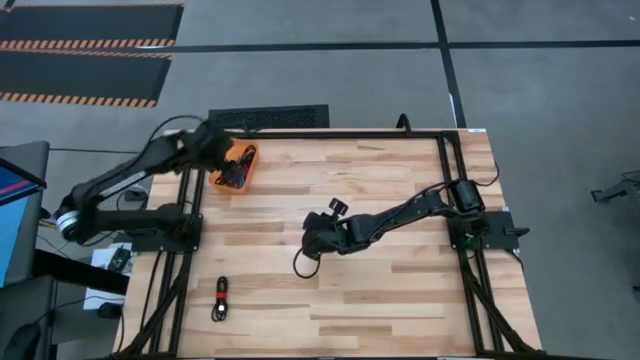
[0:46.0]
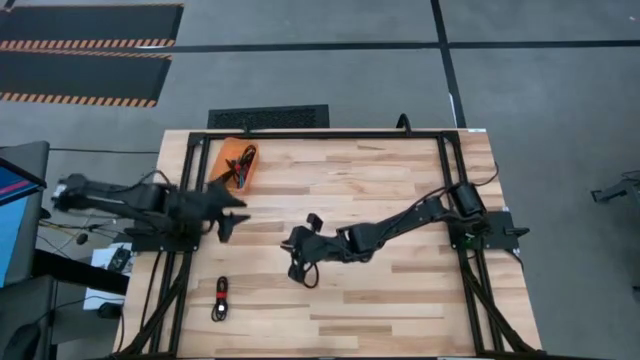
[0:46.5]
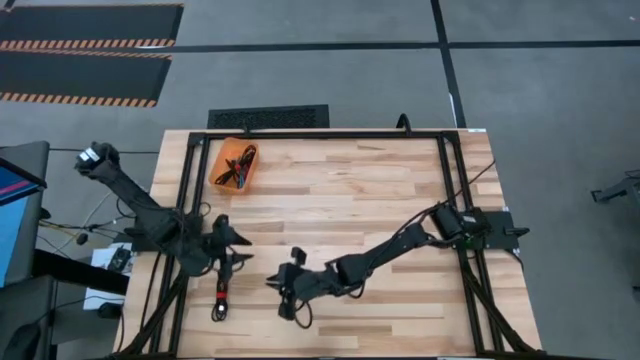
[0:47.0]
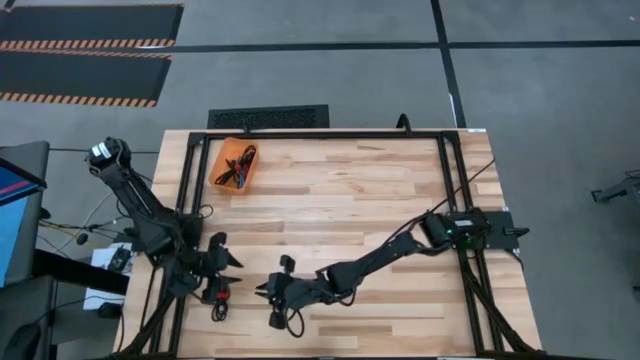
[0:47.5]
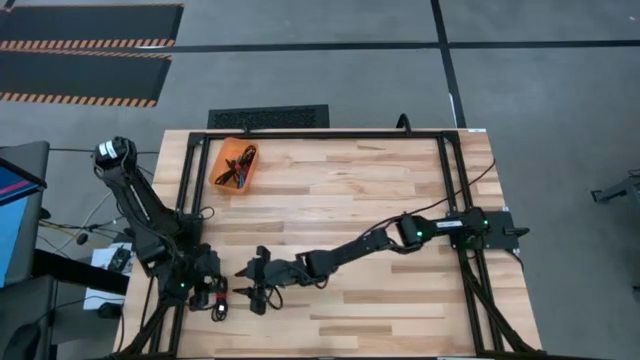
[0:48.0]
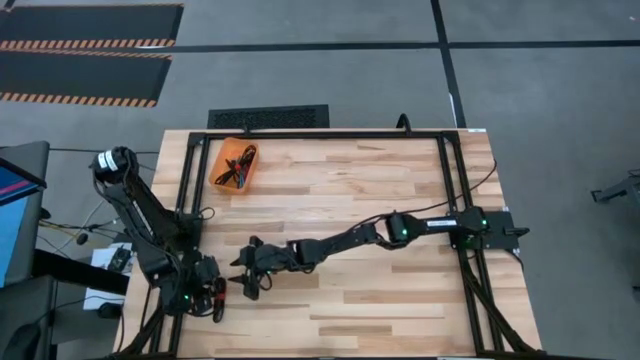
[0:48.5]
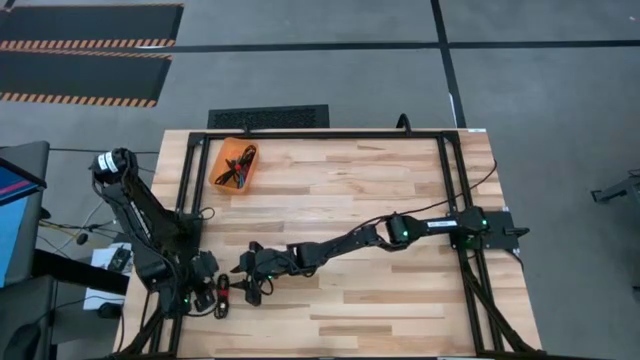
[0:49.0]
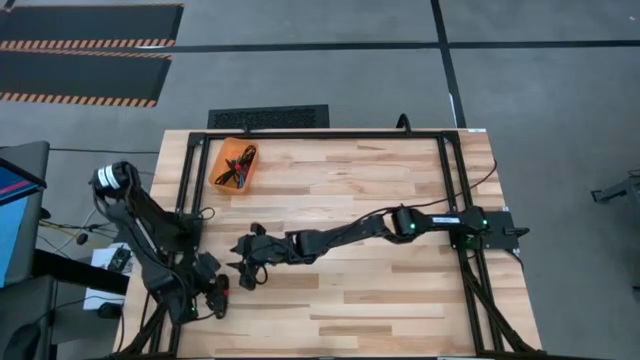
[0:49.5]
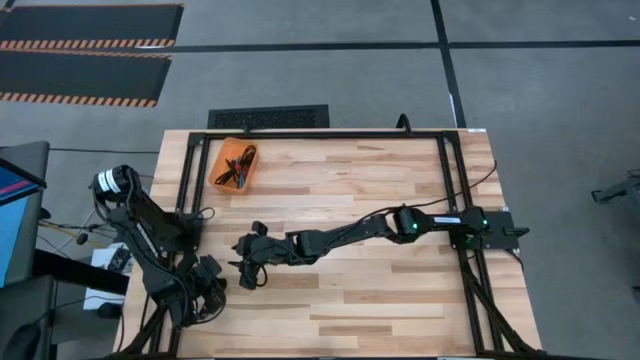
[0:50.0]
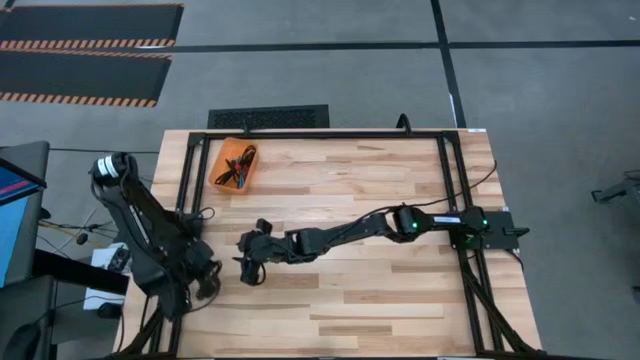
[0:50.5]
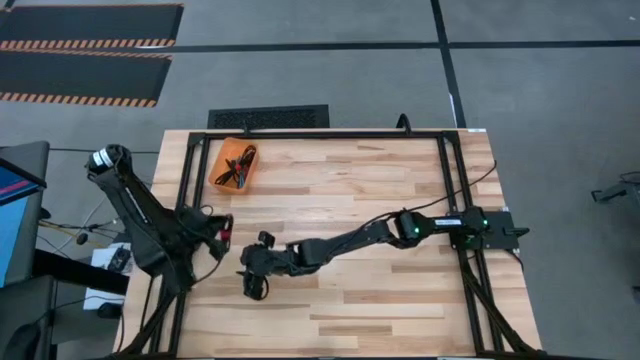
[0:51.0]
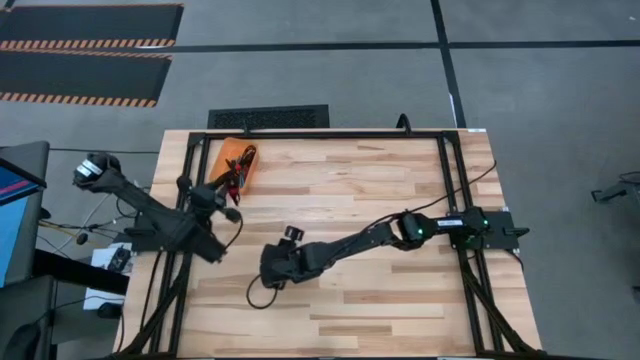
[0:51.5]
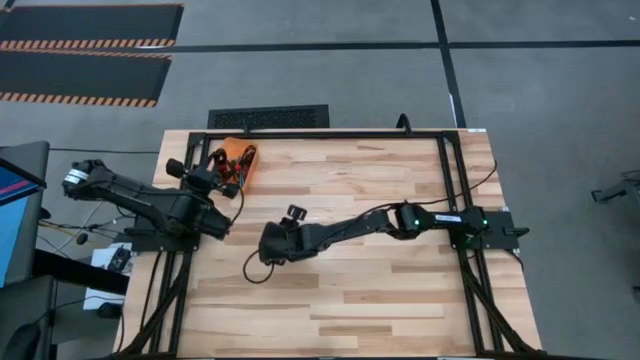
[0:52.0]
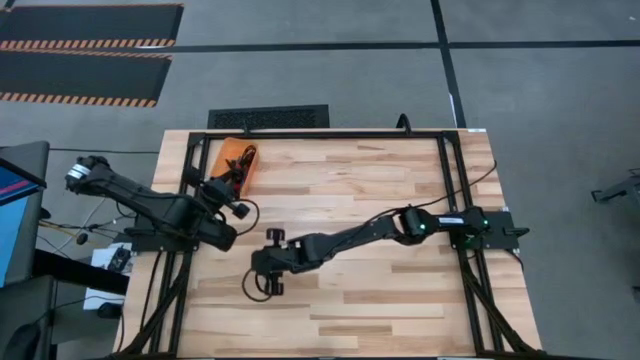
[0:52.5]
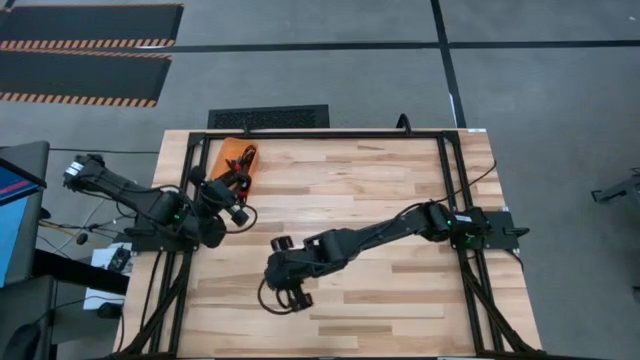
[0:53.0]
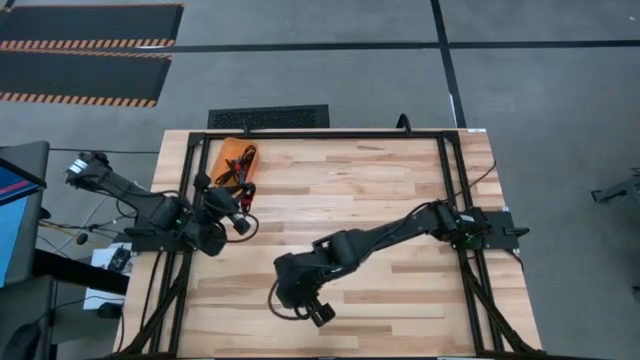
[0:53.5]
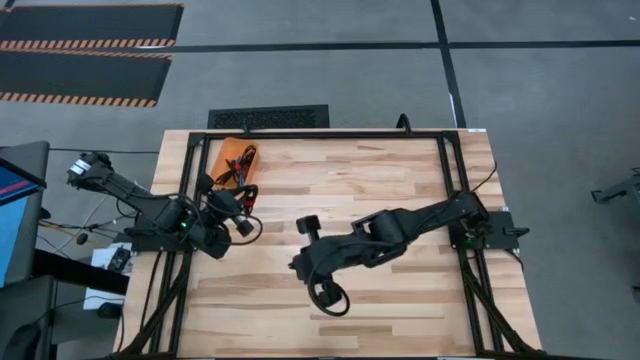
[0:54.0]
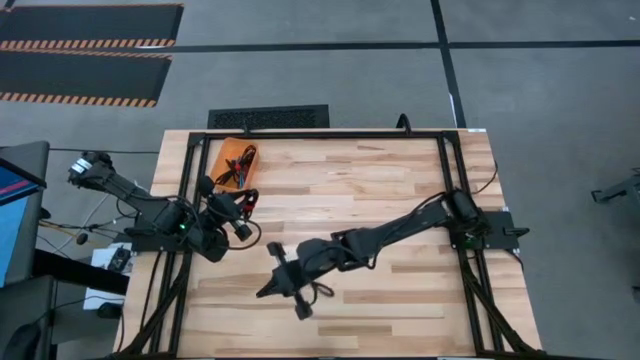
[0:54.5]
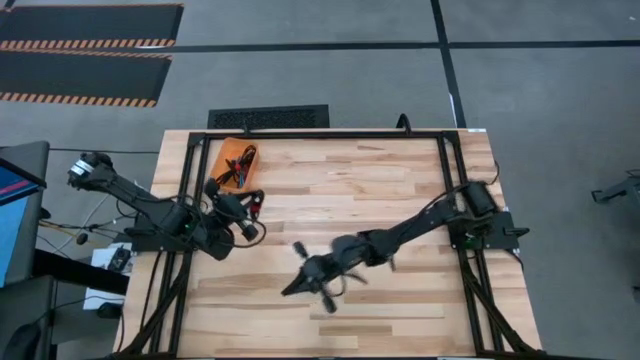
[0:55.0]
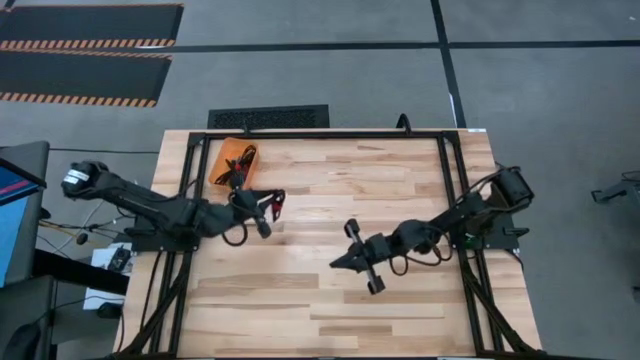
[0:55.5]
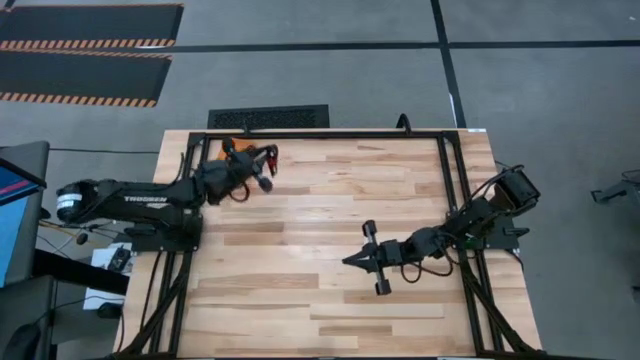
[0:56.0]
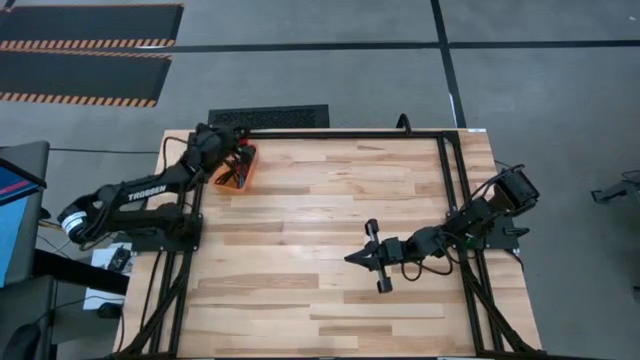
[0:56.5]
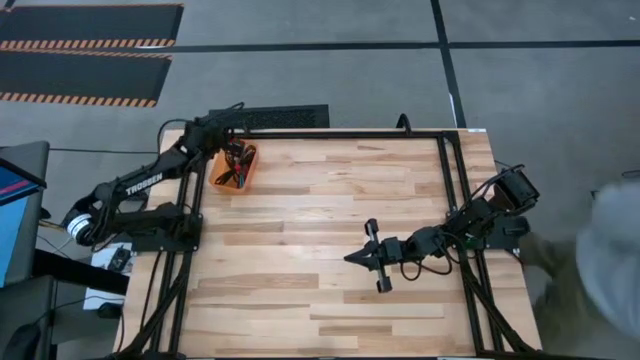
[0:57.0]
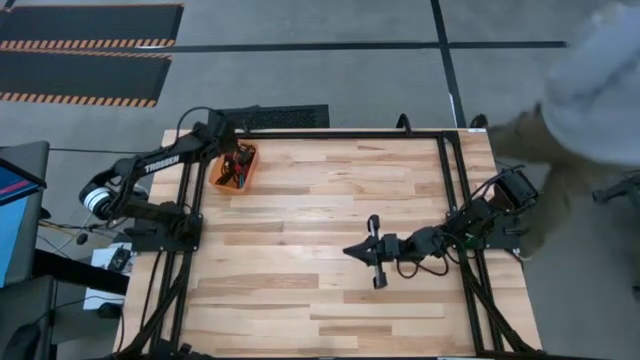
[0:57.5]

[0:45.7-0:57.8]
Task: Pick and place USB-C Cables
Put the black charger cable into the orange bin

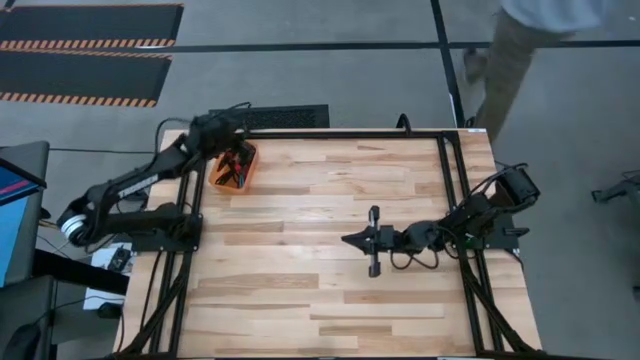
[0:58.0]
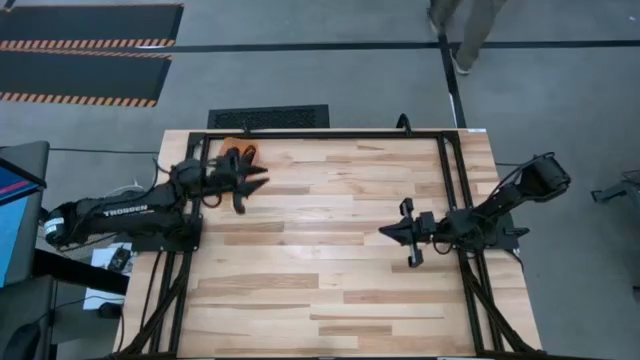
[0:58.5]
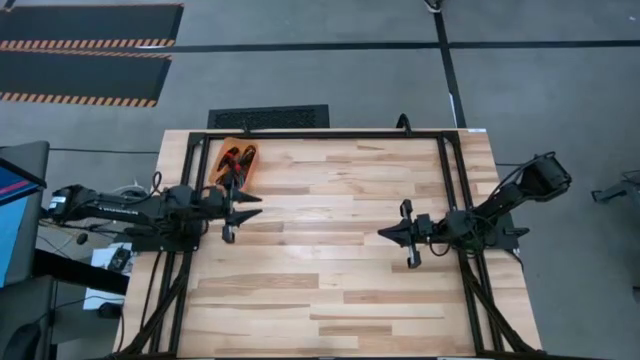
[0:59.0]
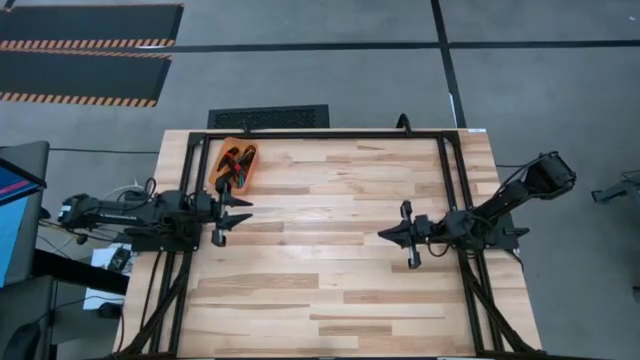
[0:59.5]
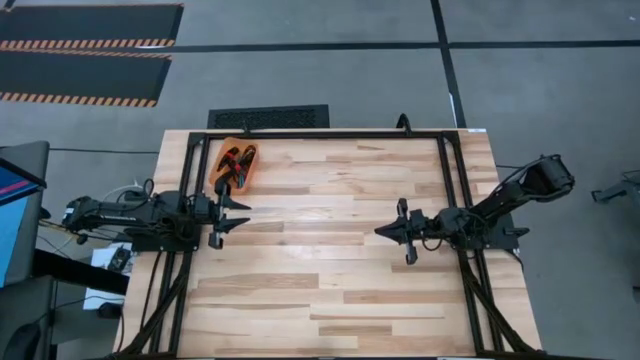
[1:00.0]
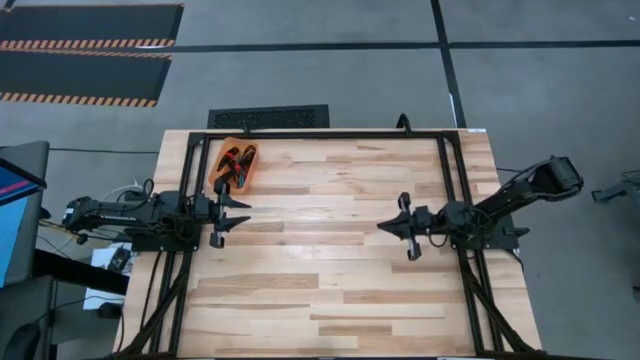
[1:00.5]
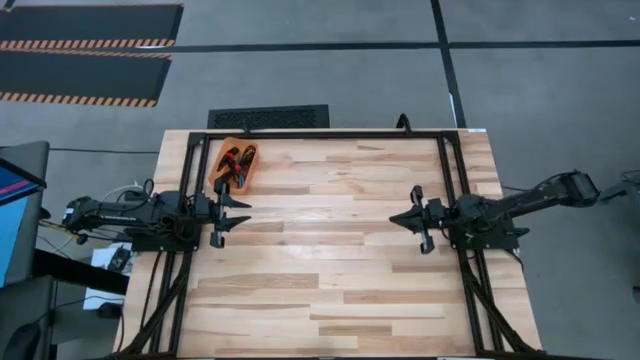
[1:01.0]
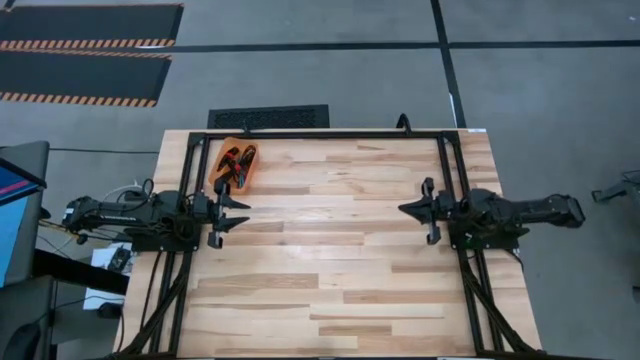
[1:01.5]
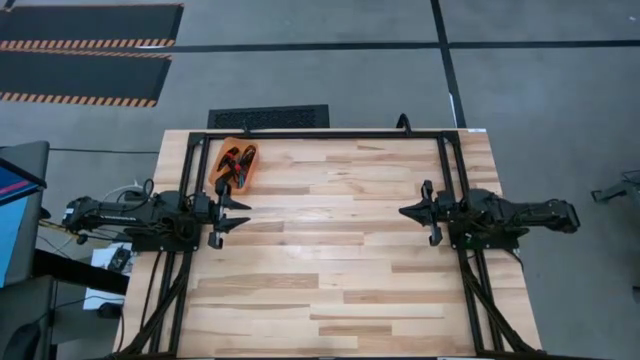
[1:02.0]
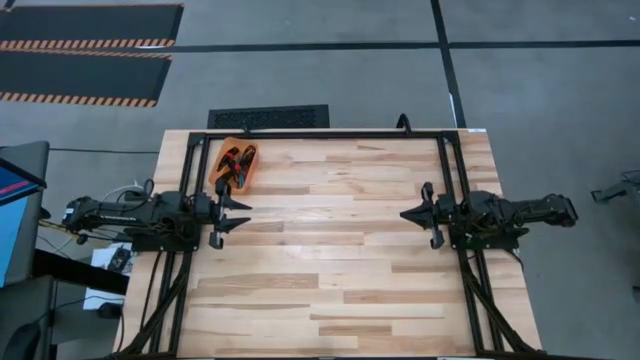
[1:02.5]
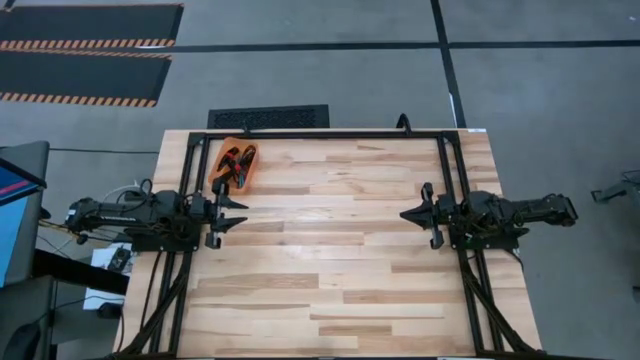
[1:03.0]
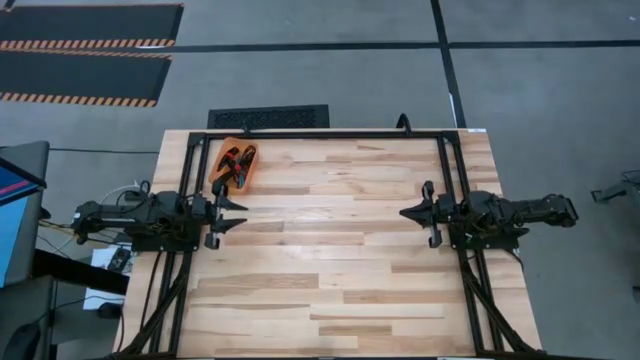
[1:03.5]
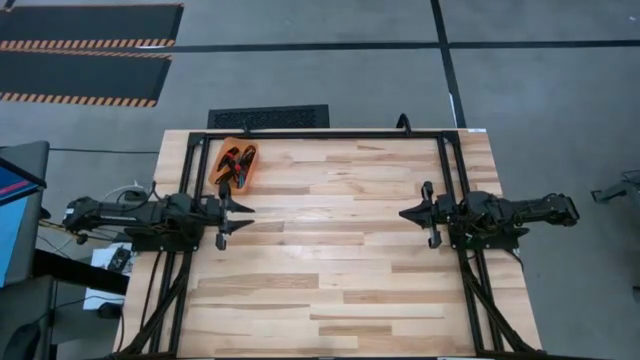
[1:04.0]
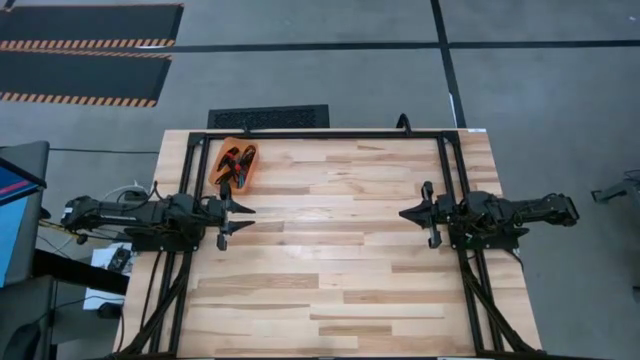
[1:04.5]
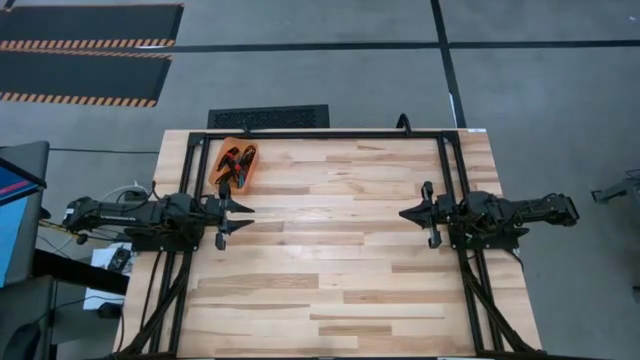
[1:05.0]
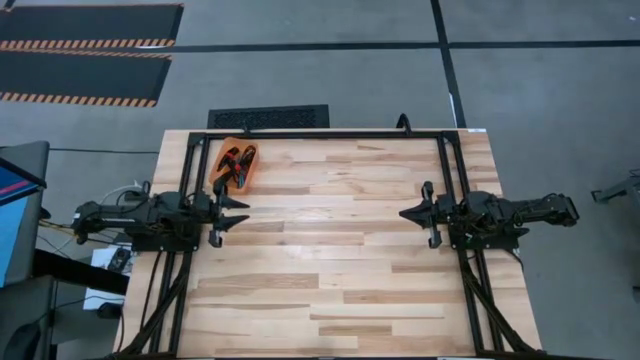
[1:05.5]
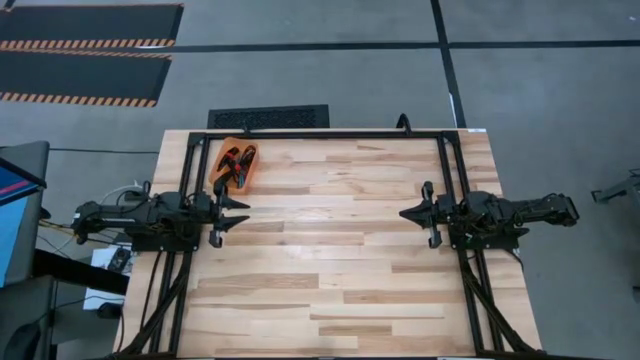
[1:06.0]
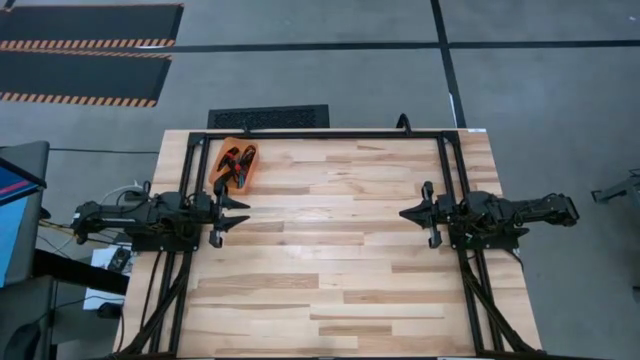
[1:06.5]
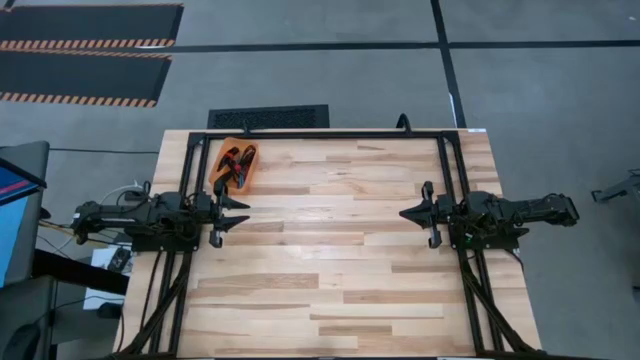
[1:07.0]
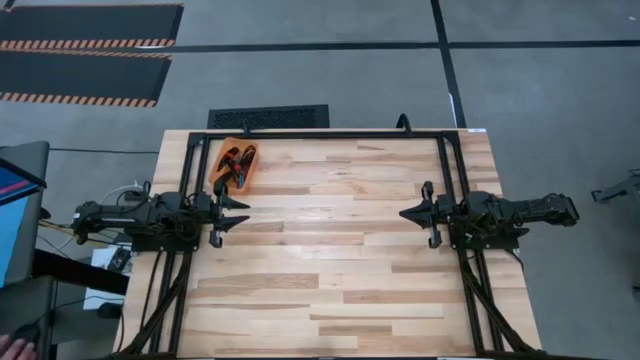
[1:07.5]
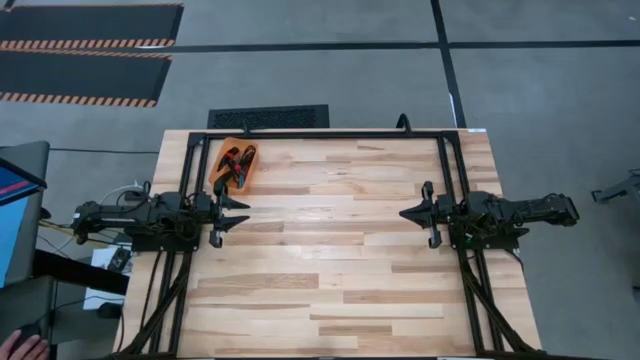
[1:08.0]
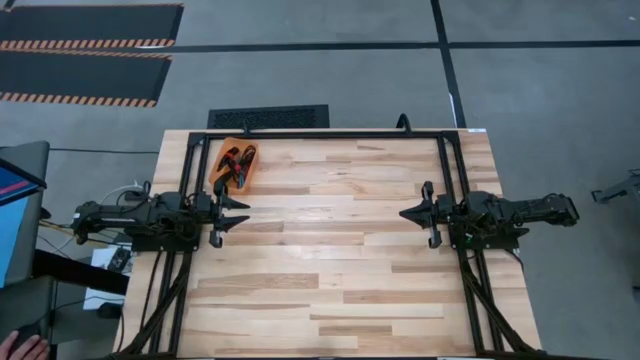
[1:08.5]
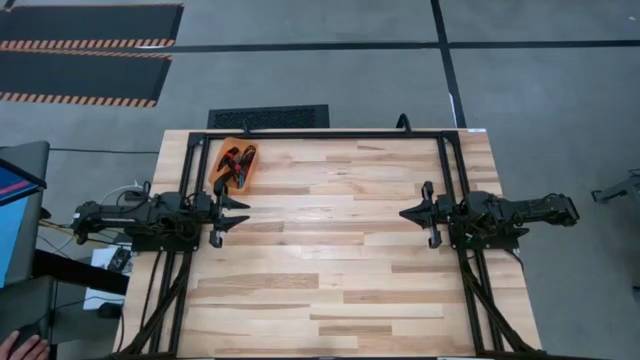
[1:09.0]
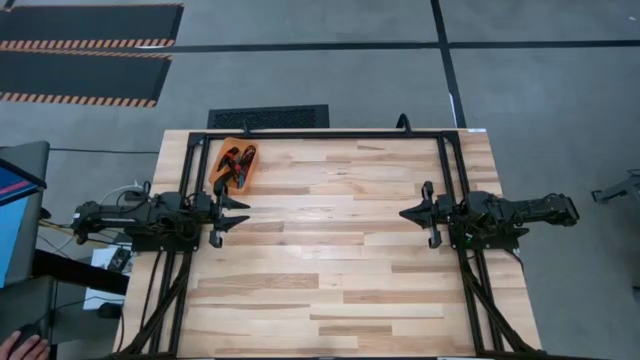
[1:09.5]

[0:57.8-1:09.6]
Return to Home Position
